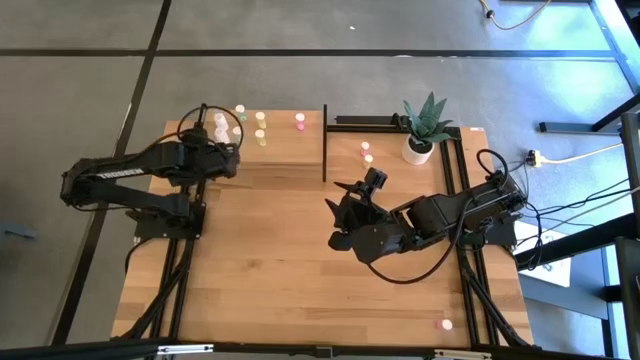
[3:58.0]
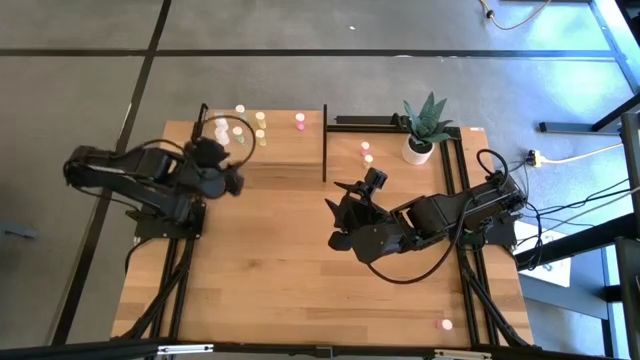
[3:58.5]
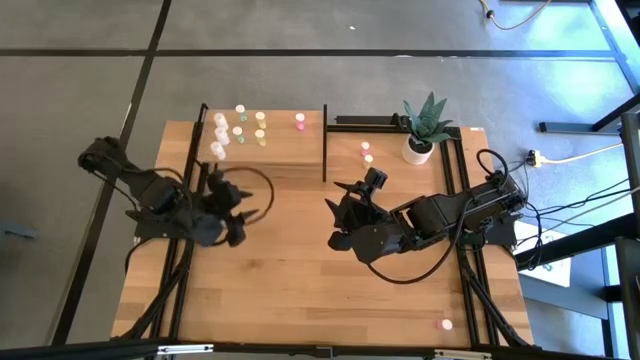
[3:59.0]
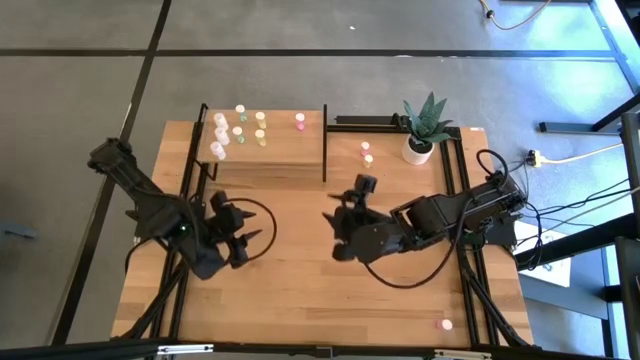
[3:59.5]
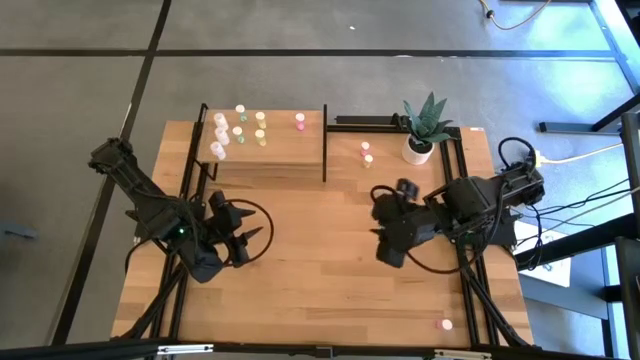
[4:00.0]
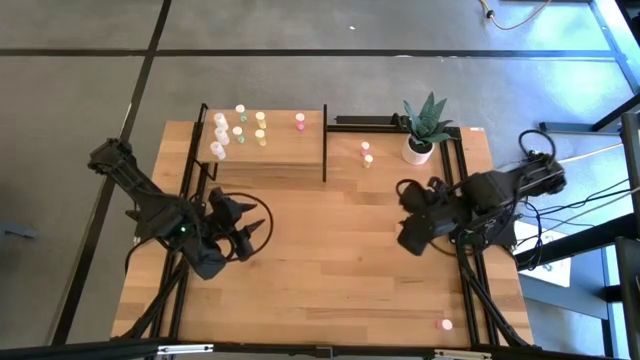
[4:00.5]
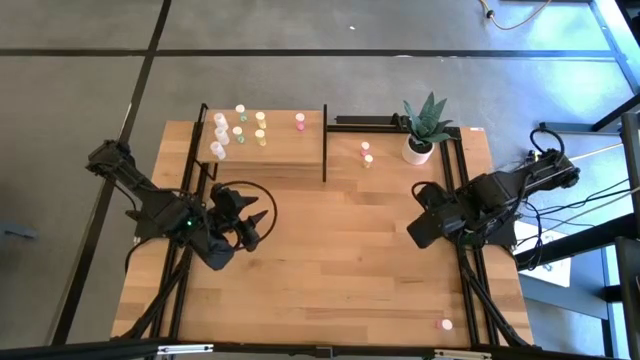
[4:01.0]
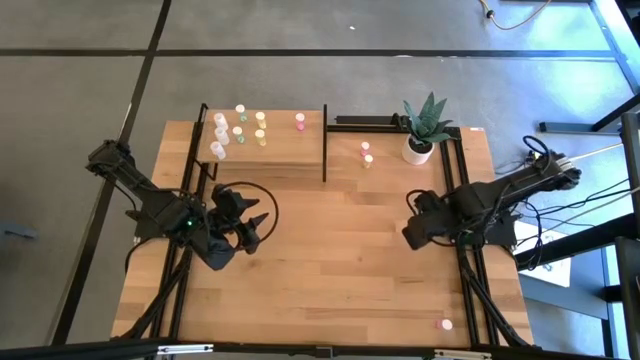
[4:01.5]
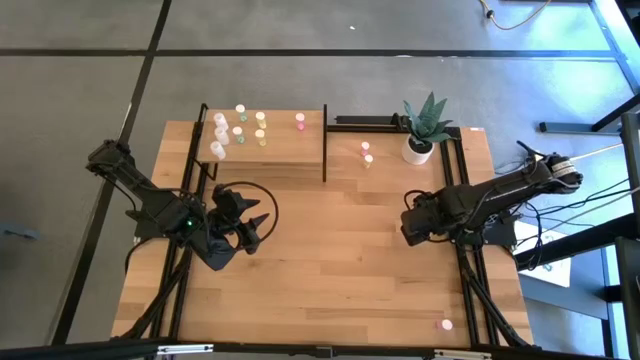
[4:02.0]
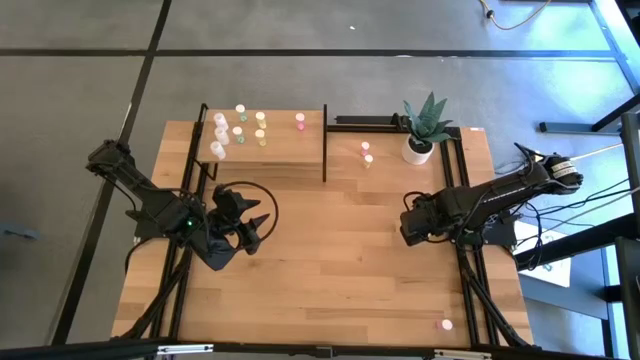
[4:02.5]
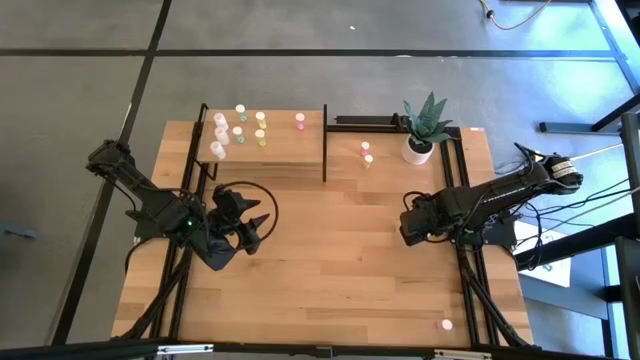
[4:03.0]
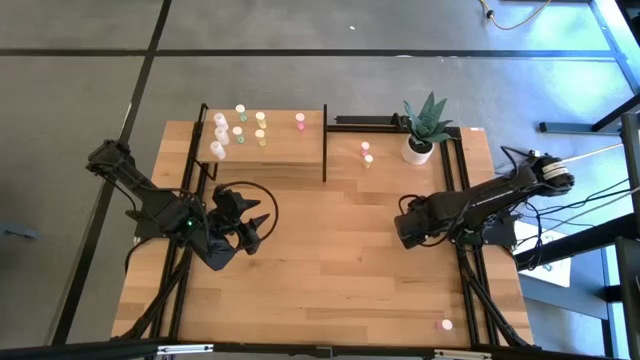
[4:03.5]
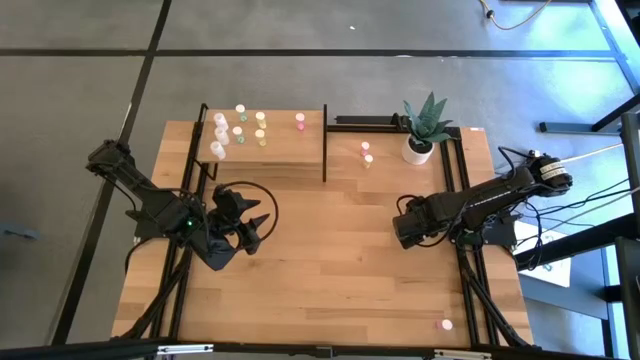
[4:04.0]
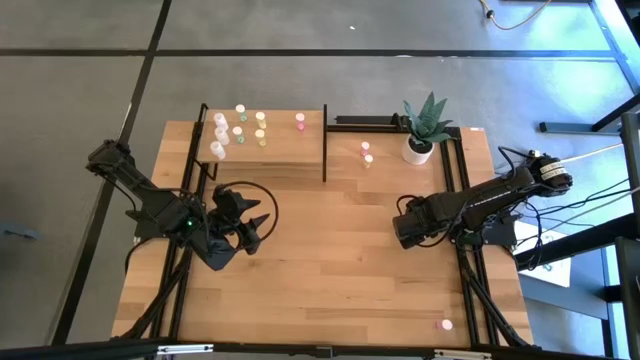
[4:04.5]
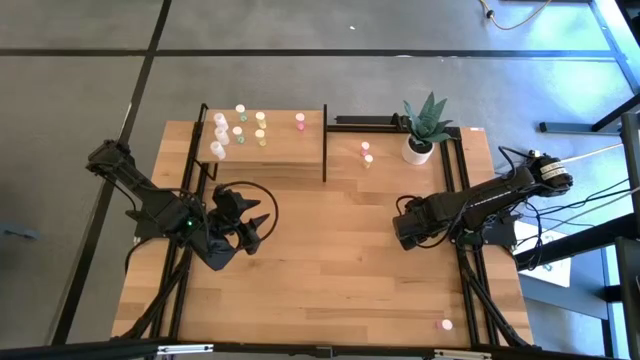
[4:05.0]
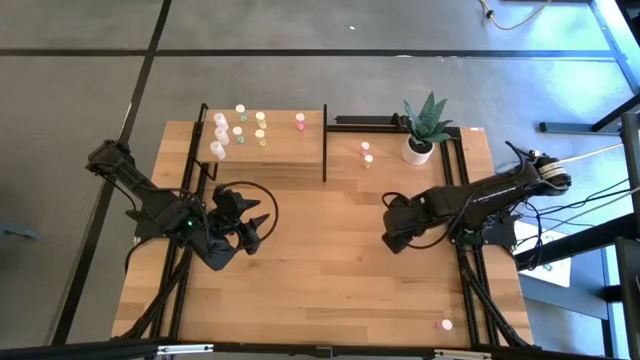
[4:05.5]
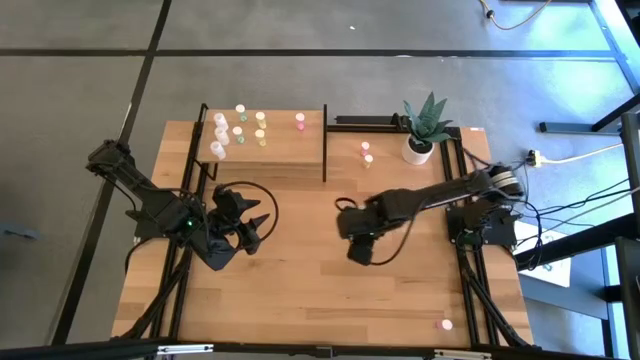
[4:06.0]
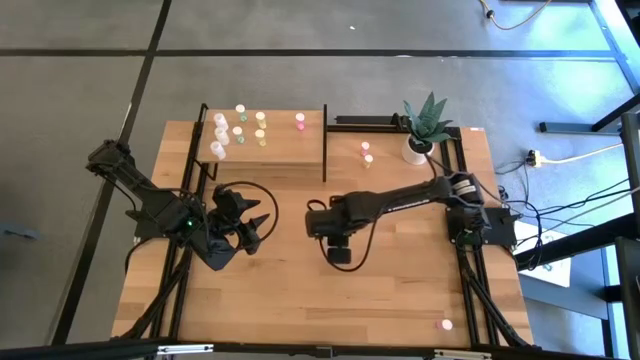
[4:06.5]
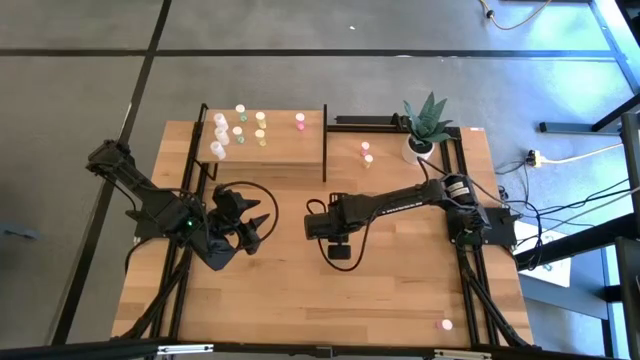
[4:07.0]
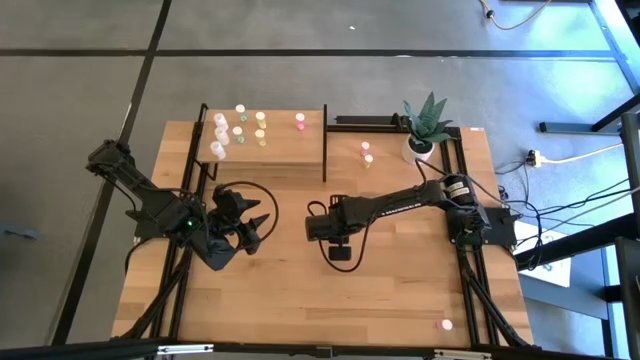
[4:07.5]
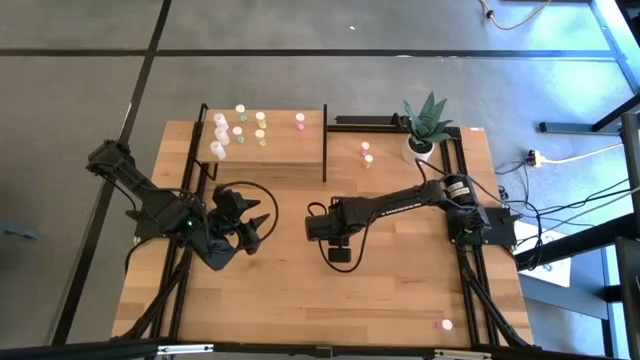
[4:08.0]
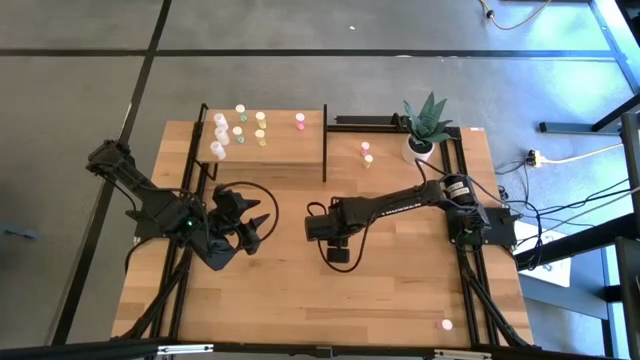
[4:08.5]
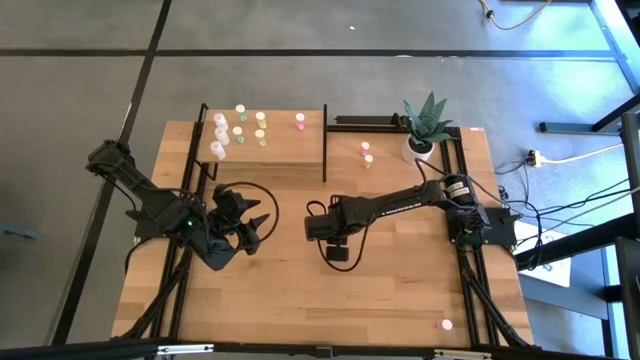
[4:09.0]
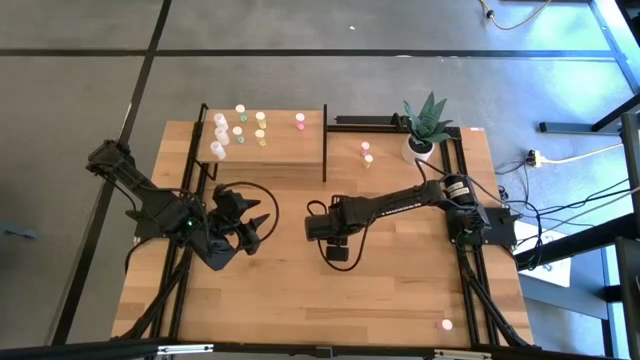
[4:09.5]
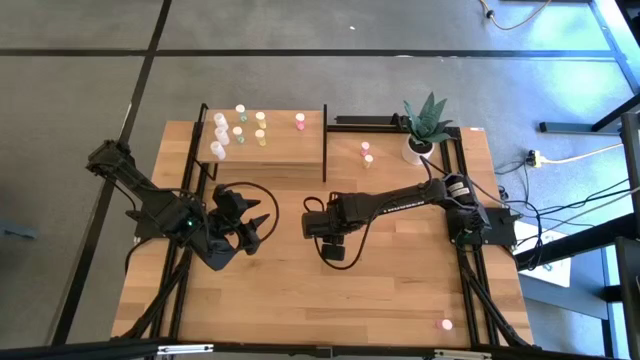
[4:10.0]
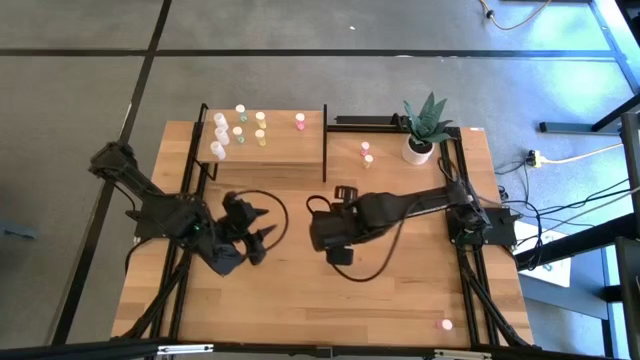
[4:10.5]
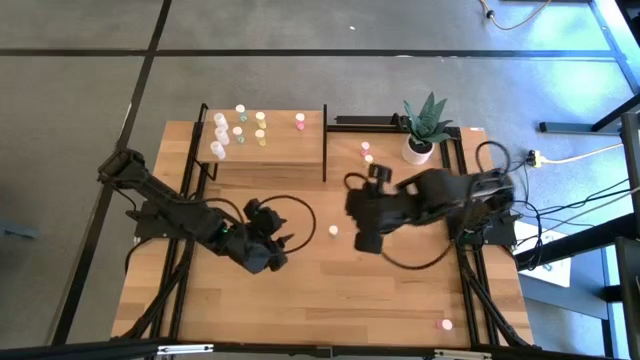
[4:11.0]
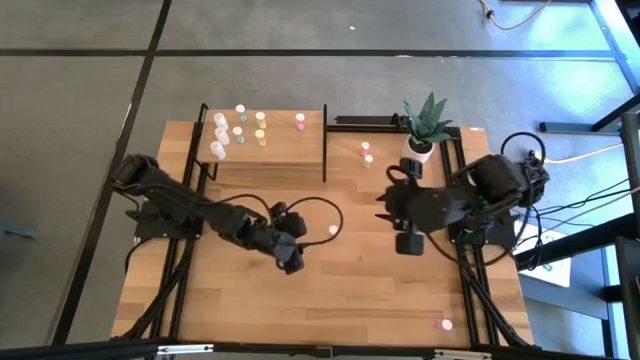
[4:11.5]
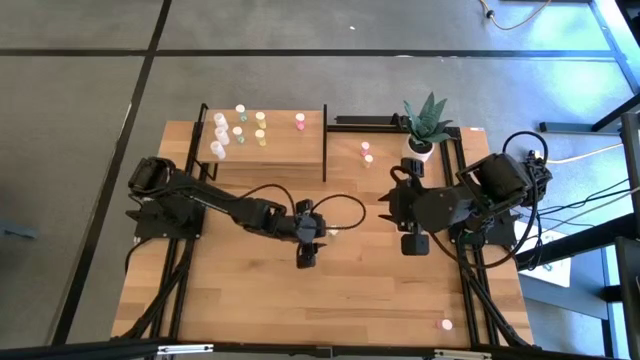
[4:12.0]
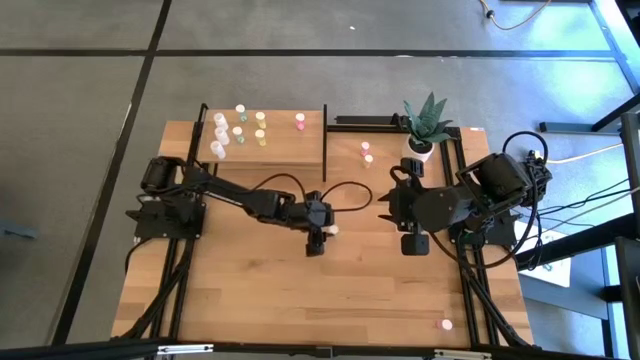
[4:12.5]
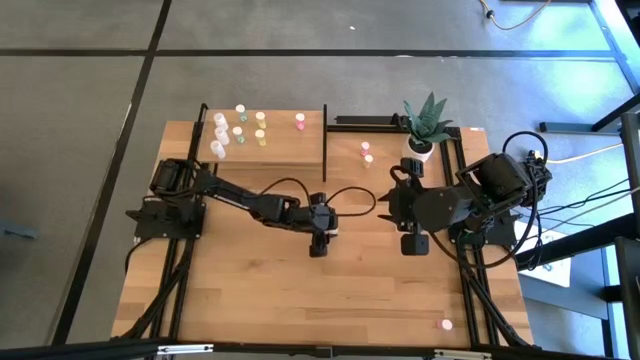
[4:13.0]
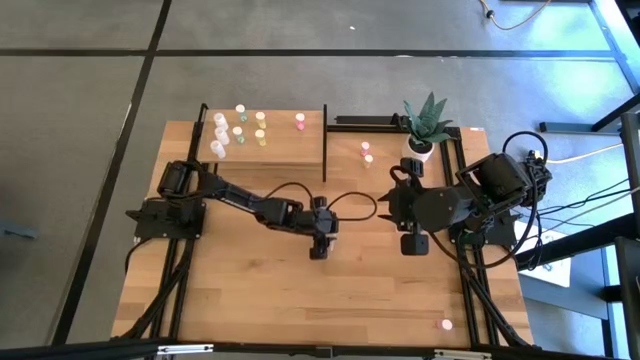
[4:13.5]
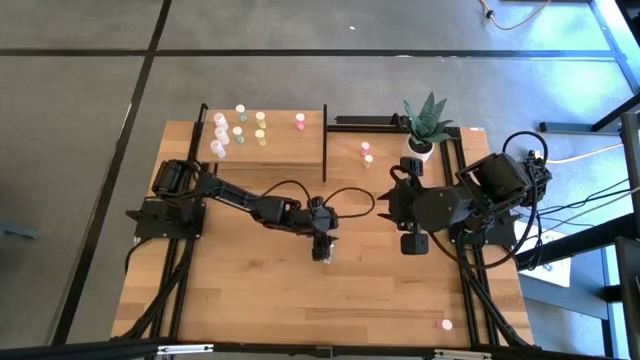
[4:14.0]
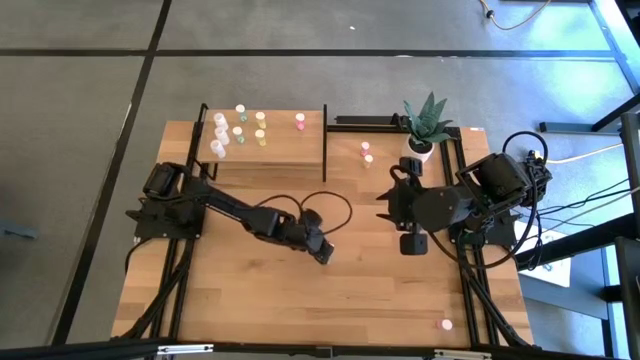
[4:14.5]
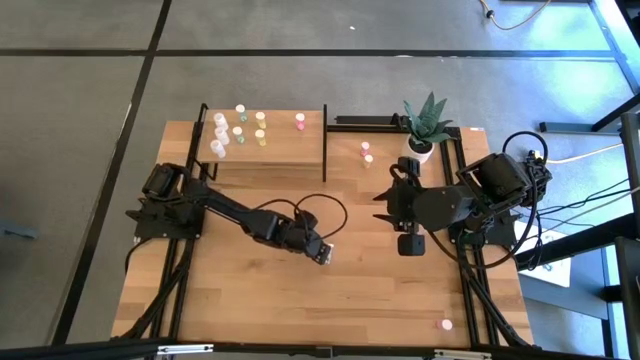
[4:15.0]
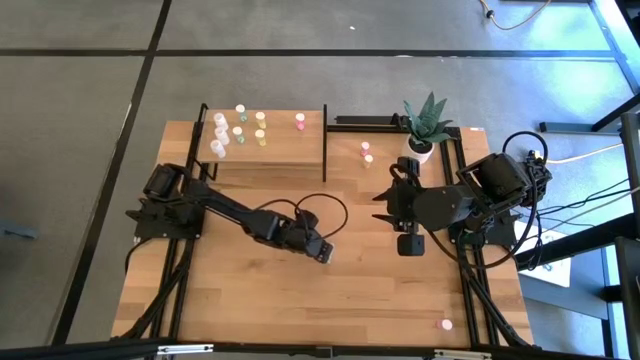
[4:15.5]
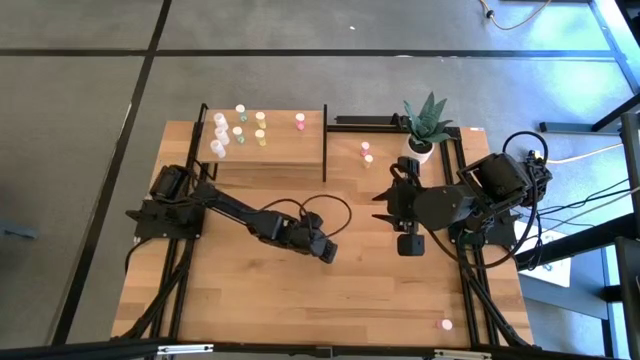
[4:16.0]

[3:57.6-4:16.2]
Task: Pick and place medicine bottles onto shelf by color
Put the blue pill bottle aligned with the other blue pill bottle on the shelf
